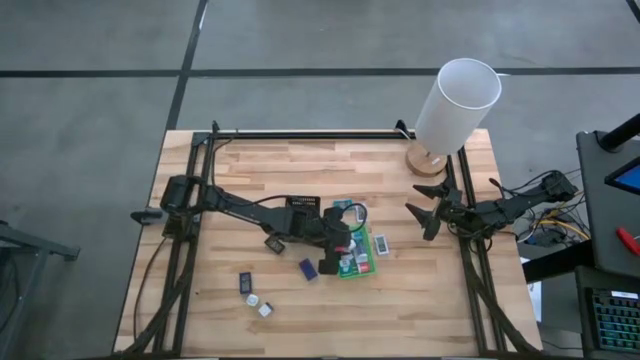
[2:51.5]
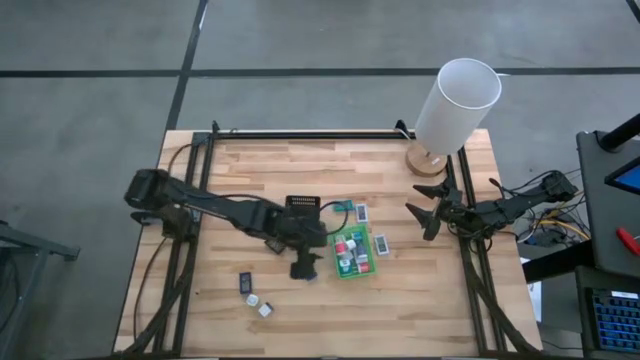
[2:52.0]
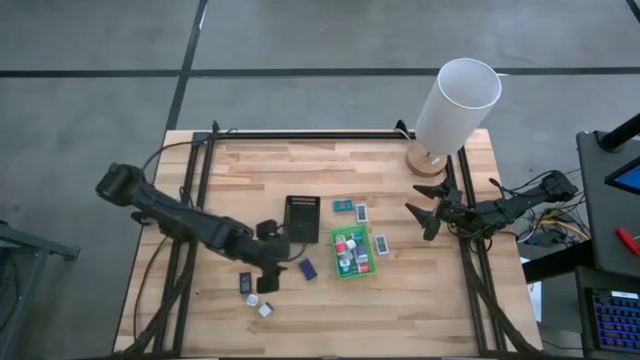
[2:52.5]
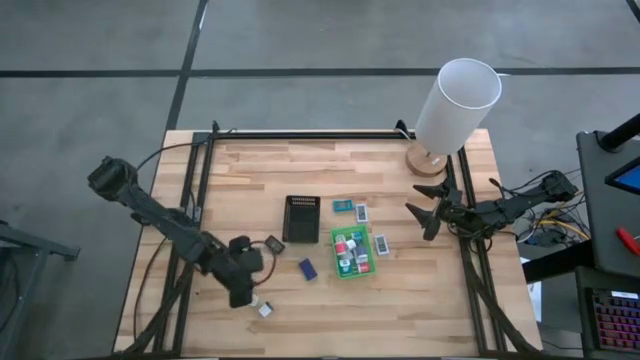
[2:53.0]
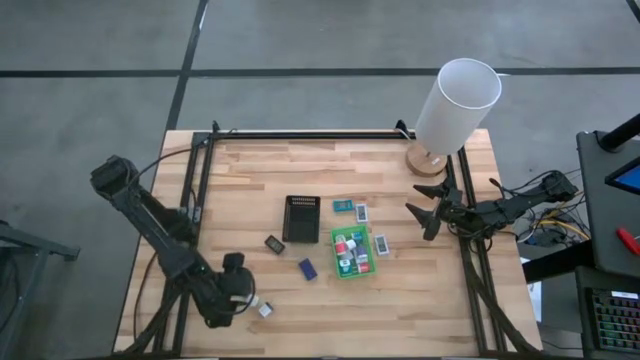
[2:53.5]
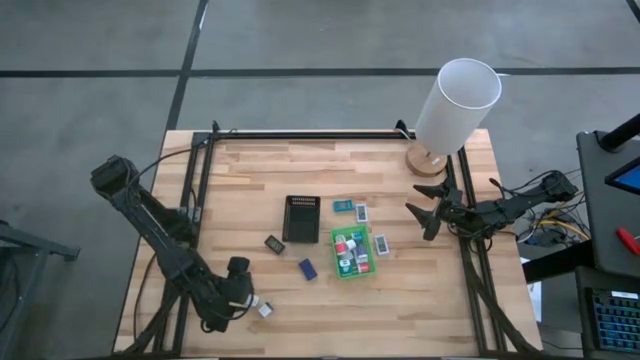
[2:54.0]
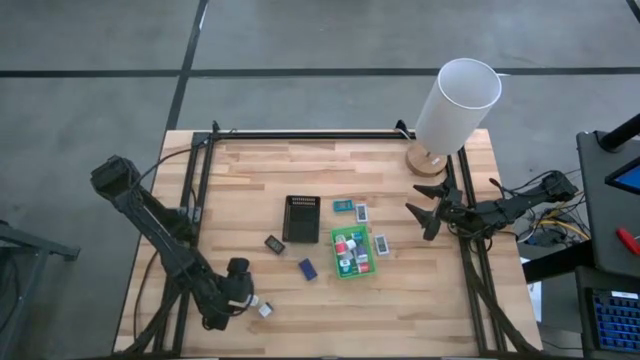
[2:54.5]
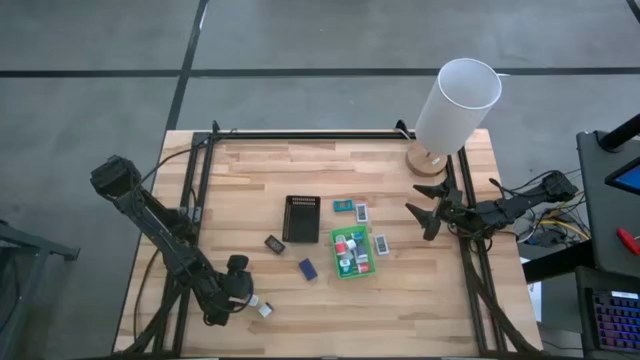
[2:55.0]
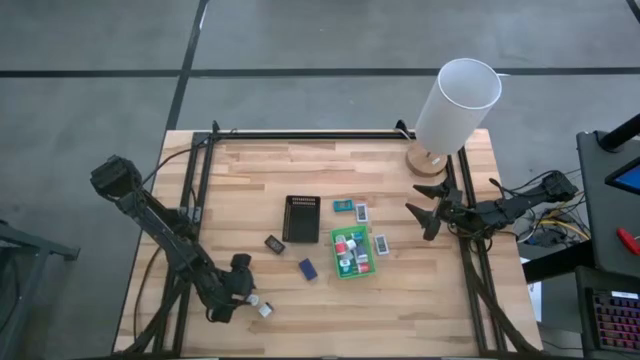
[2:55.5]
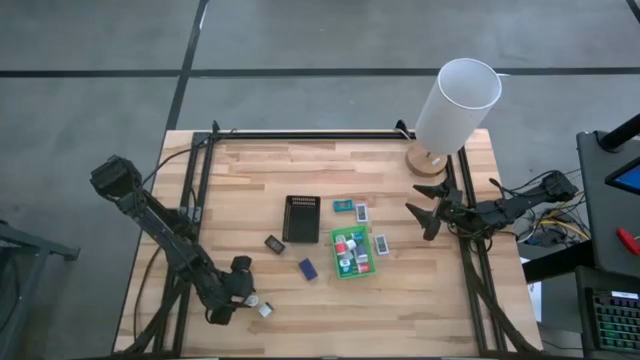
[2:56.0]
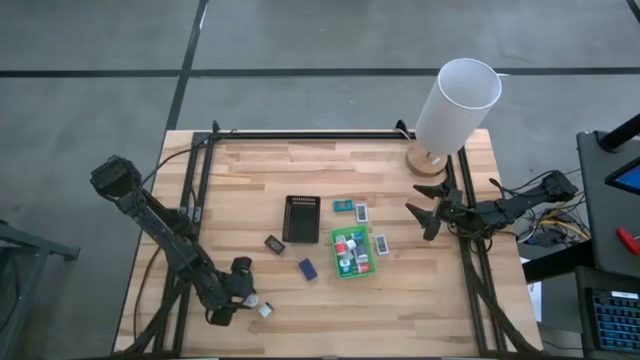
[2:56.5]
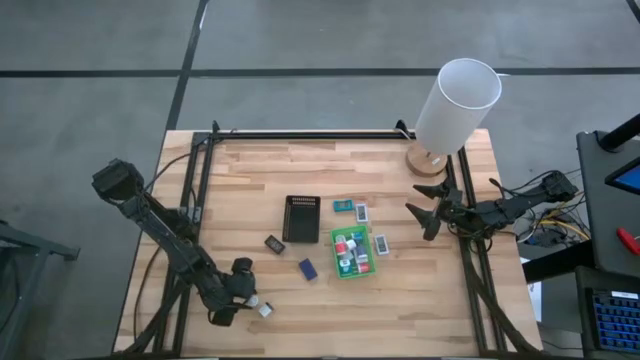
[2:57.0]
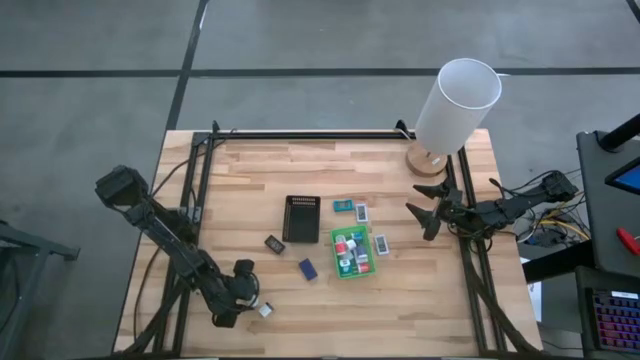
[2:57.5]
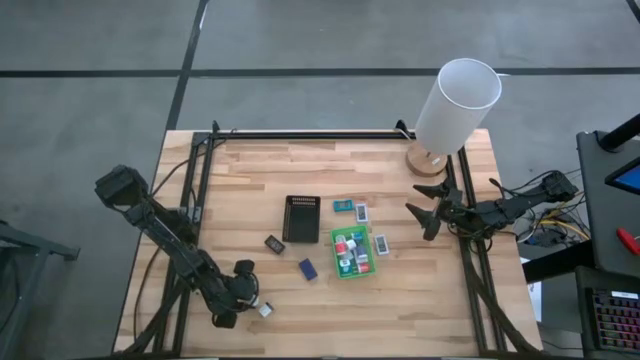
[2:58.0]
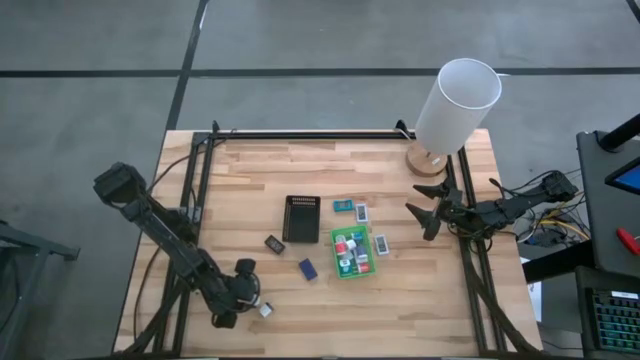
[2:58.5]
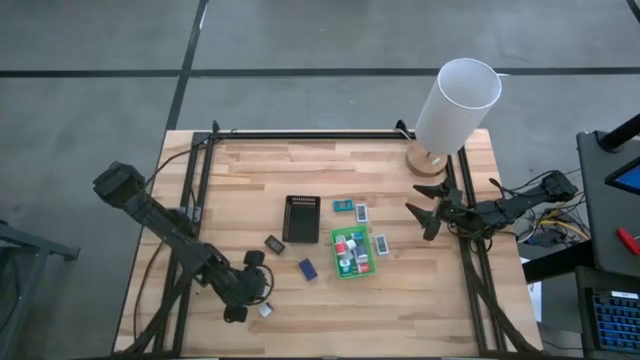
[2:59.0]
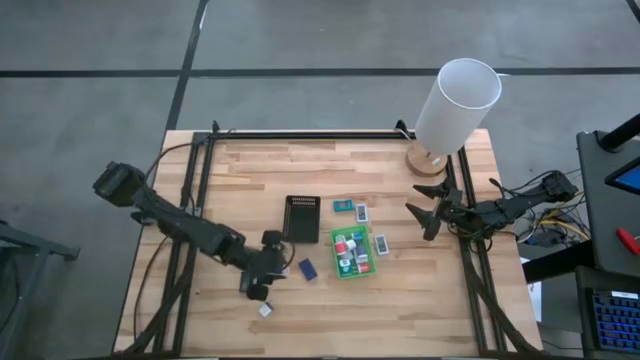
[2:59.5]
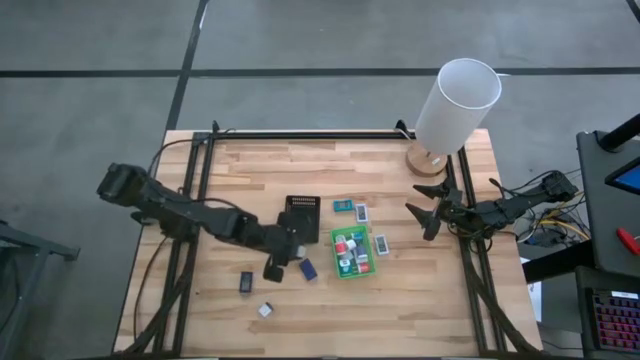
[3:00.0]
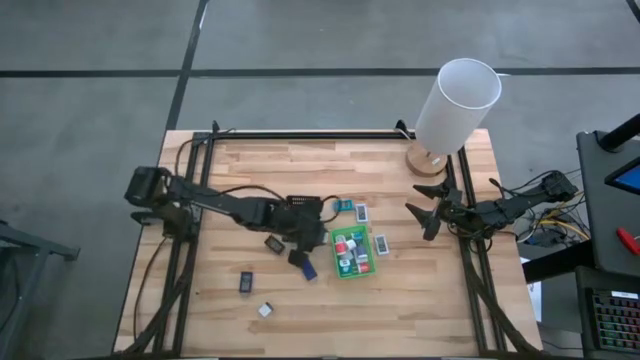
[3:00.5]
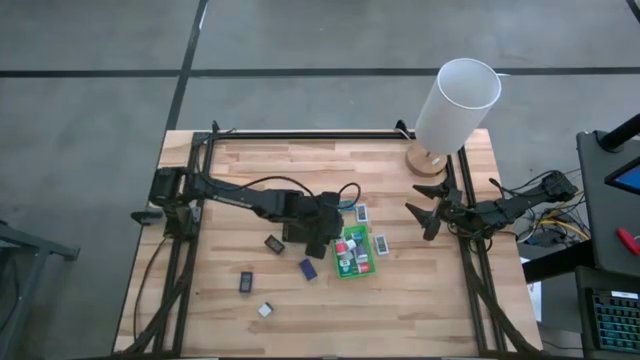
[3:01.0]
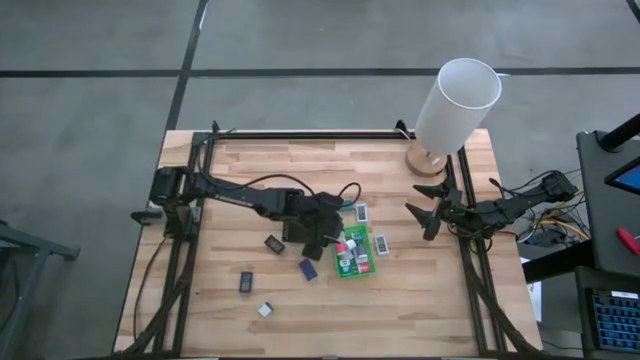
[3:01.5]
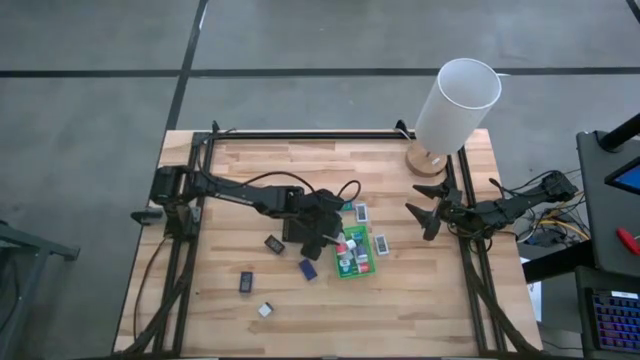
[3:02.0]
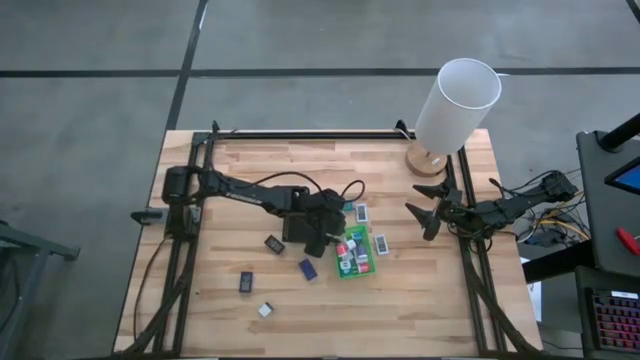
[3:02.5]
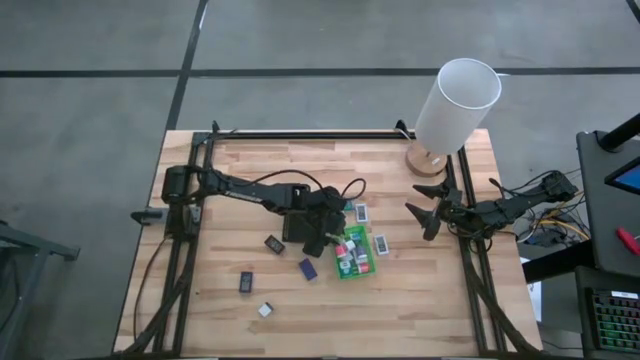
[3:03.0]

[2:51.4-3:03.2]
Task: Pick & Place Office items
Put the green charger adapter into the green bin

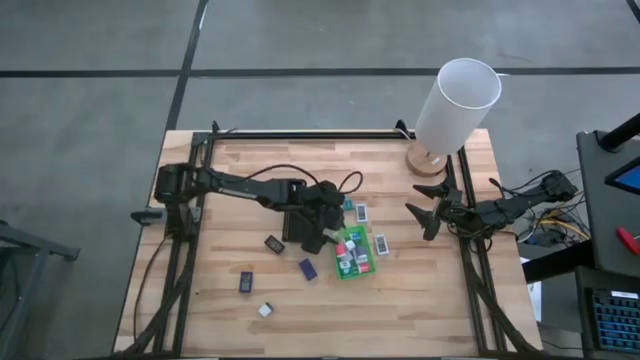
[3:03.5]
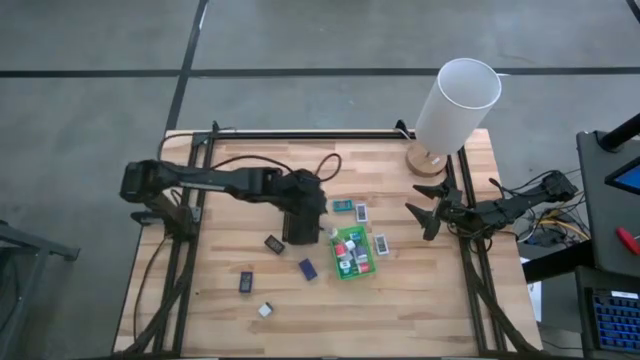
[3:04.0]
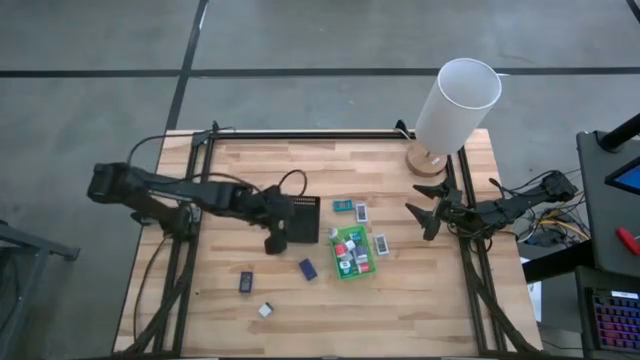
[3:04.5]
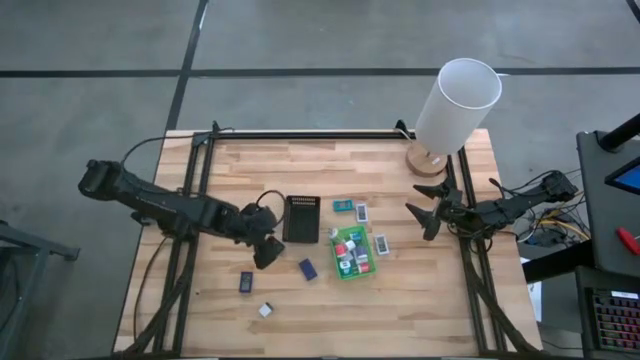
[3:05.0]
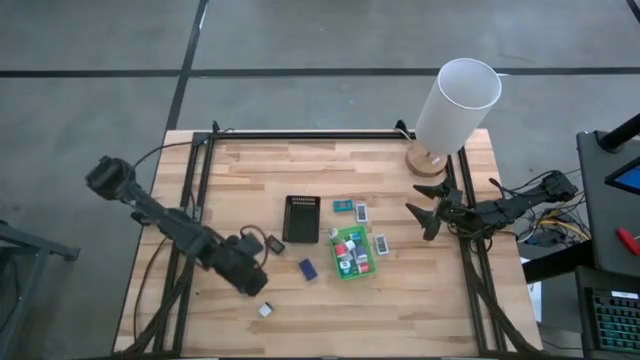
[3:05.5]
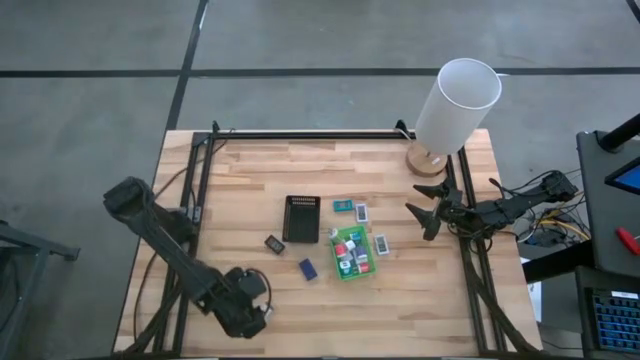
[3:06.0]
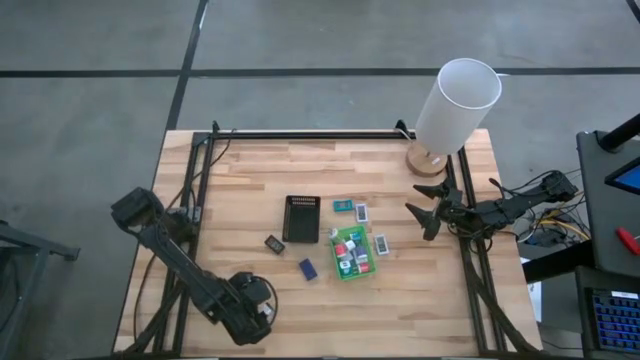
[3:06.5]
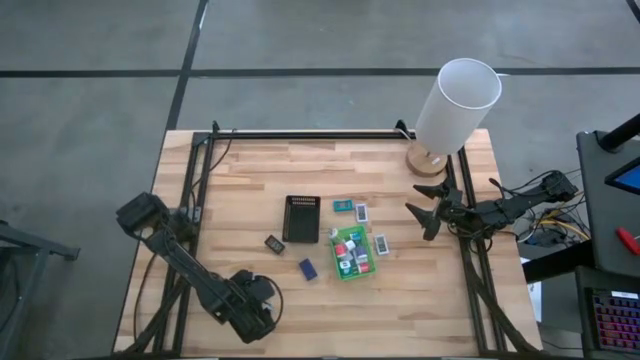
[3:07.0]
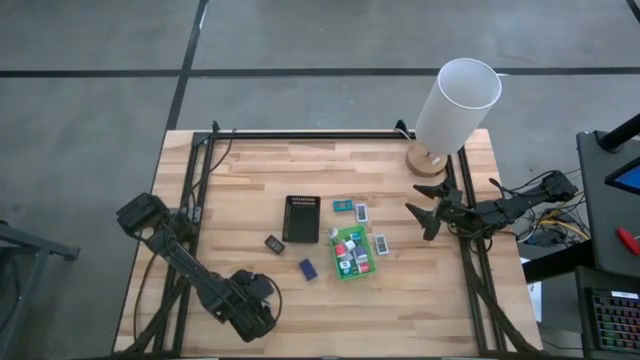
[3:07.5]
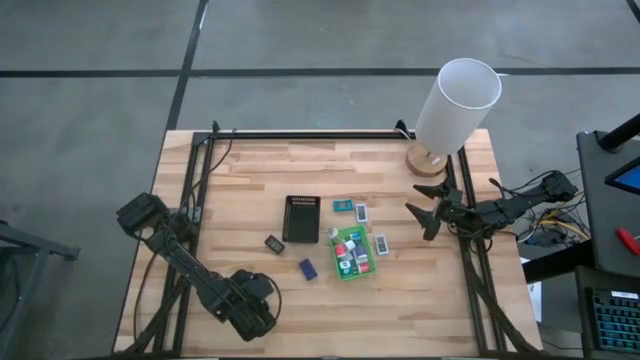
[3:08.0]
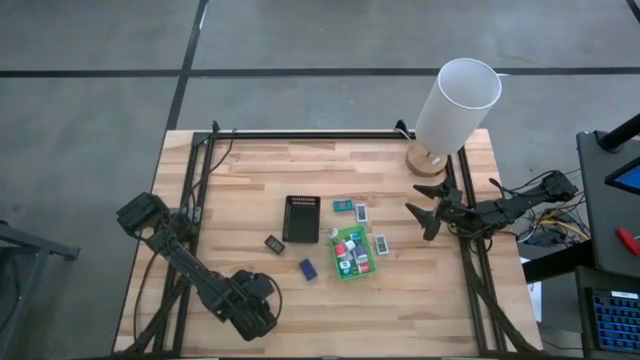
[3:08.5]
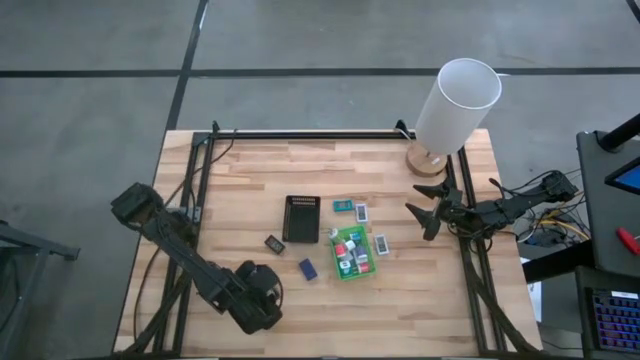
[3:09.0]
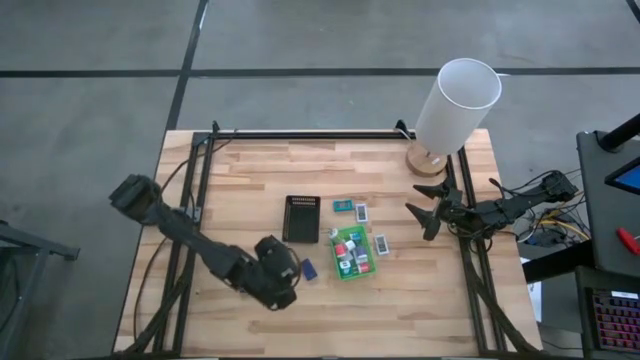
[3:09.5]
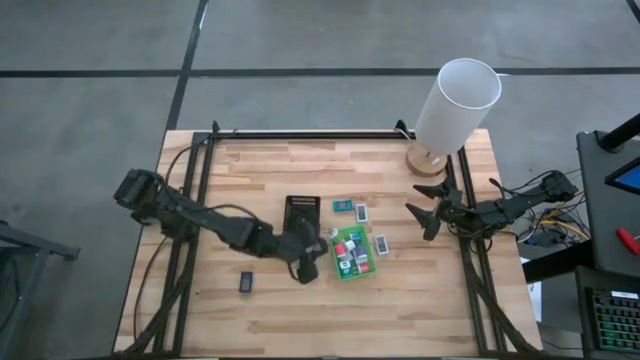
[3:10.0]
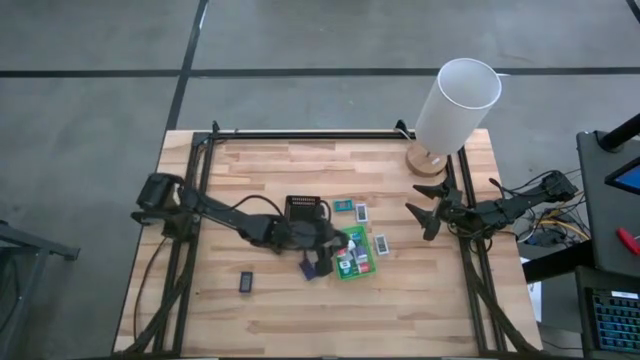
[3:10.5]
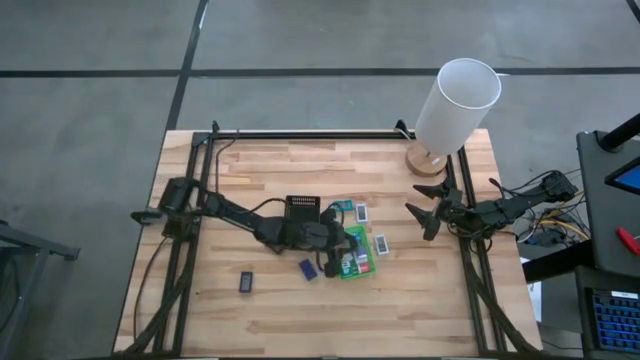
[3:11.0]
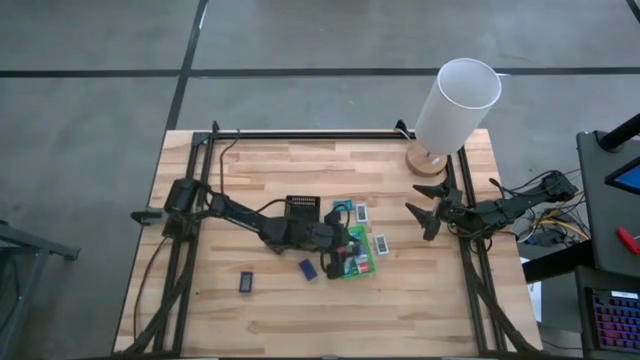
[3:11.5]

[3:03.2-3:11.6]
Put the white black charger adapter into the green bin
